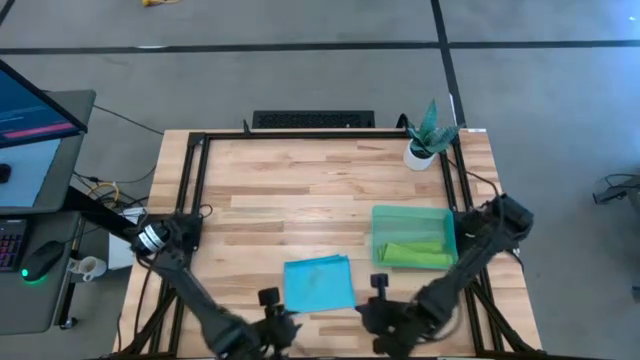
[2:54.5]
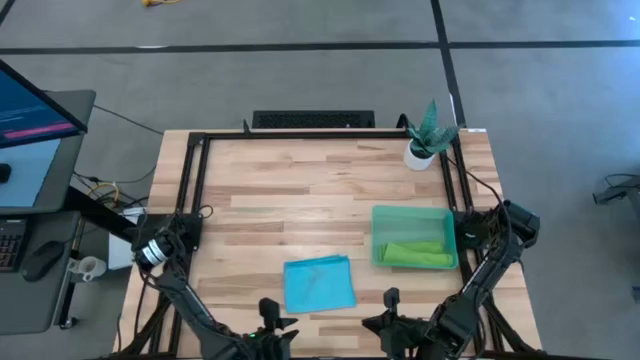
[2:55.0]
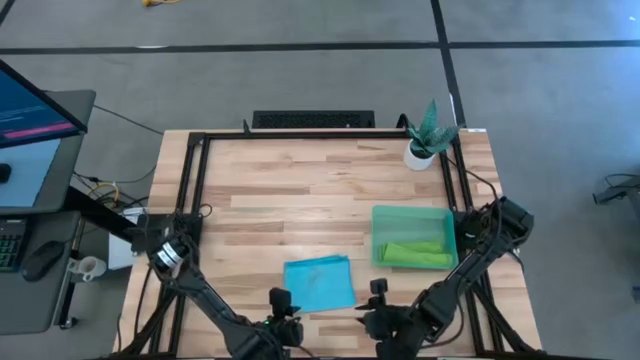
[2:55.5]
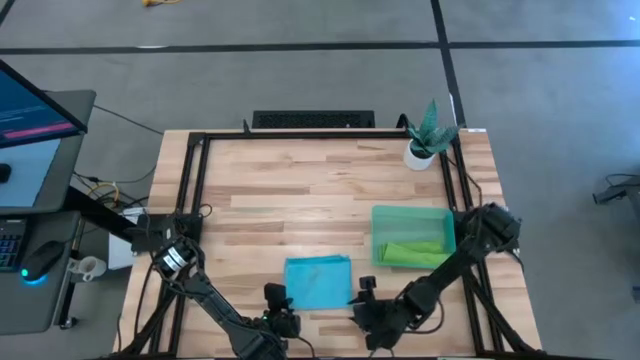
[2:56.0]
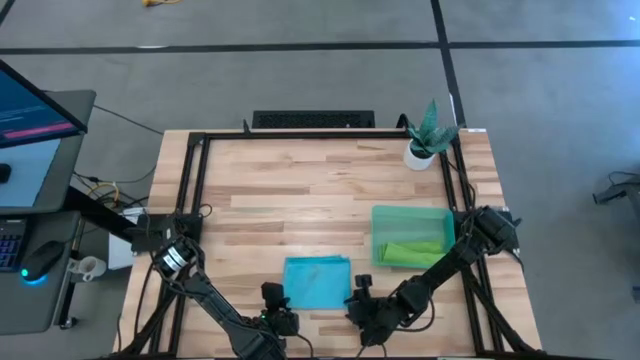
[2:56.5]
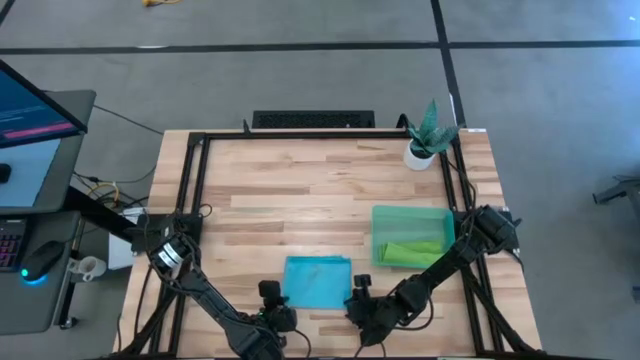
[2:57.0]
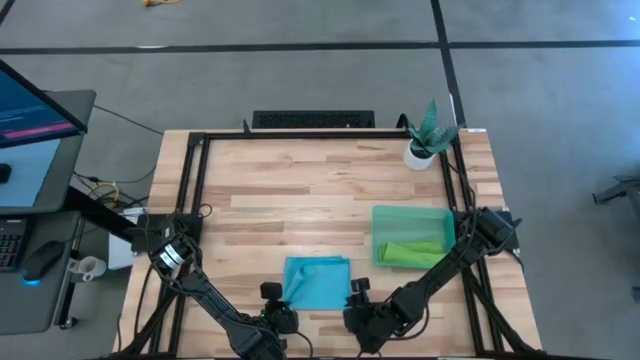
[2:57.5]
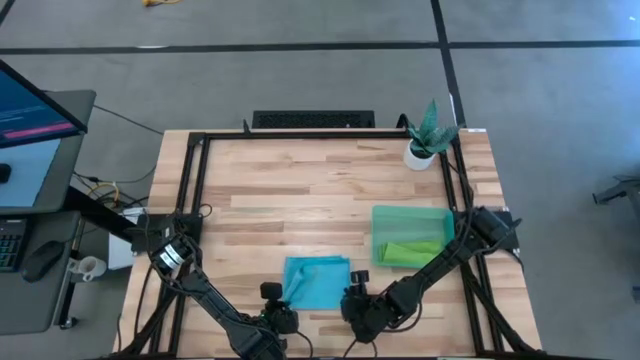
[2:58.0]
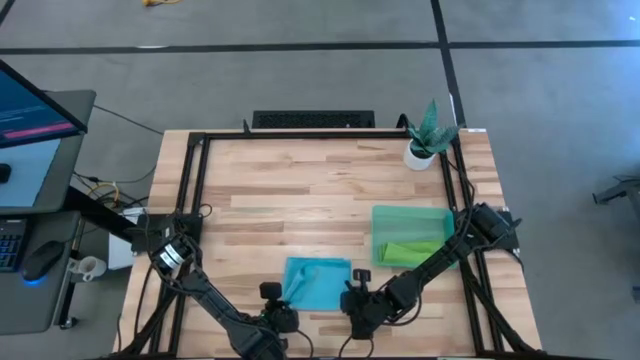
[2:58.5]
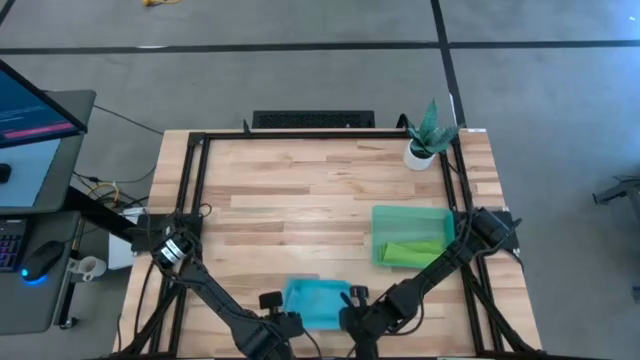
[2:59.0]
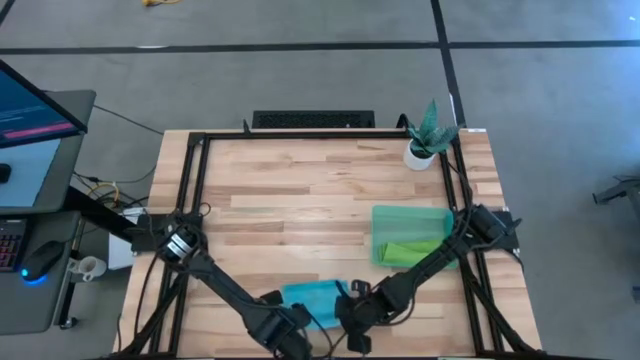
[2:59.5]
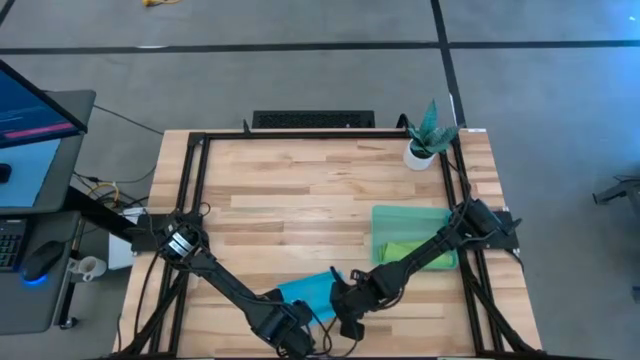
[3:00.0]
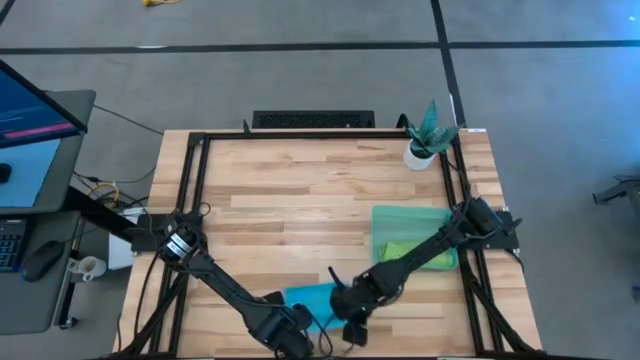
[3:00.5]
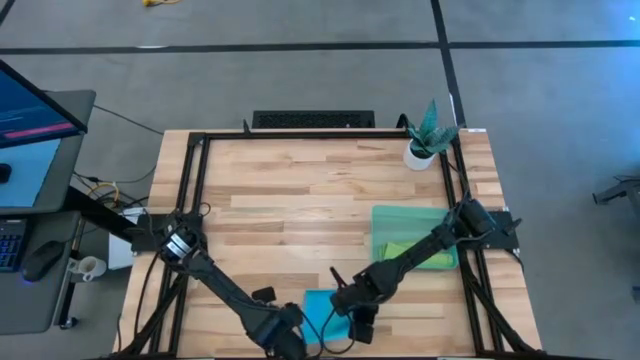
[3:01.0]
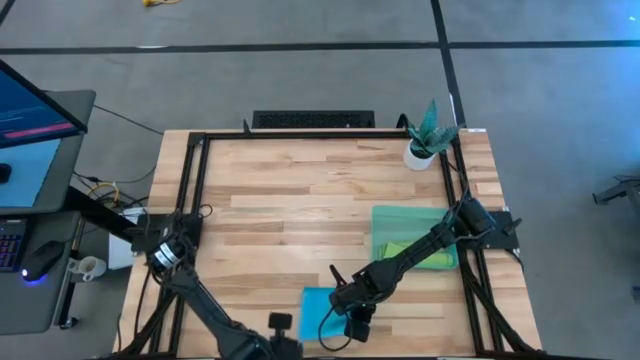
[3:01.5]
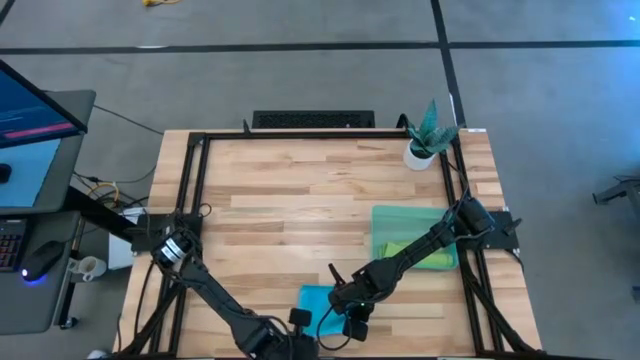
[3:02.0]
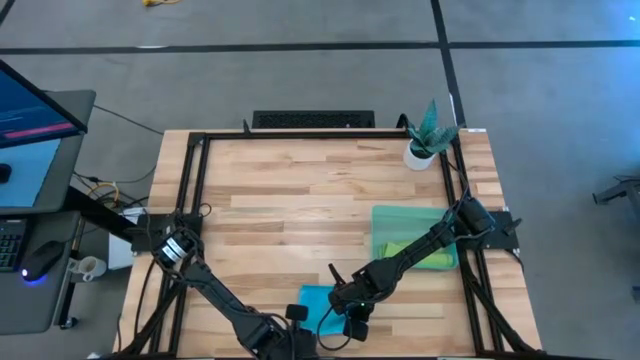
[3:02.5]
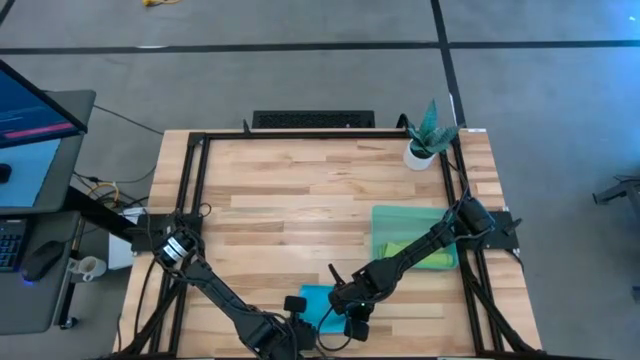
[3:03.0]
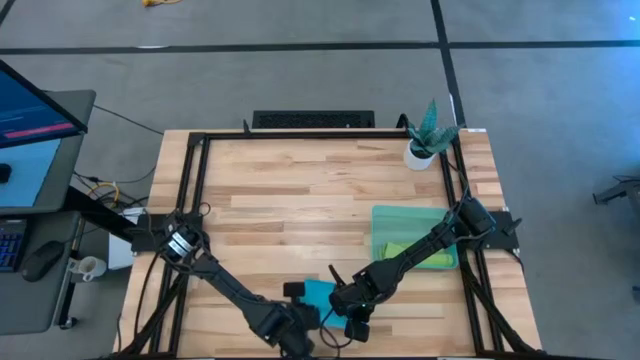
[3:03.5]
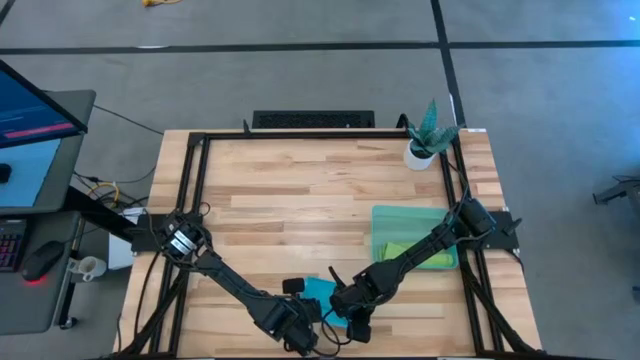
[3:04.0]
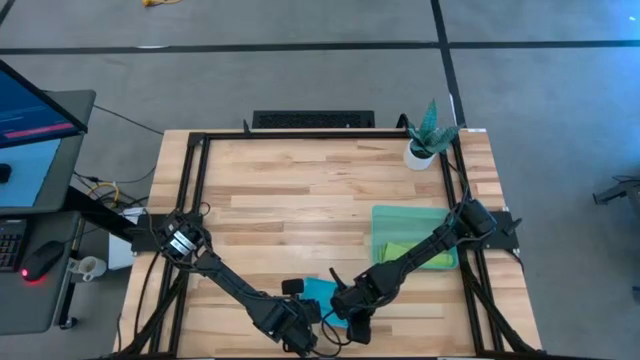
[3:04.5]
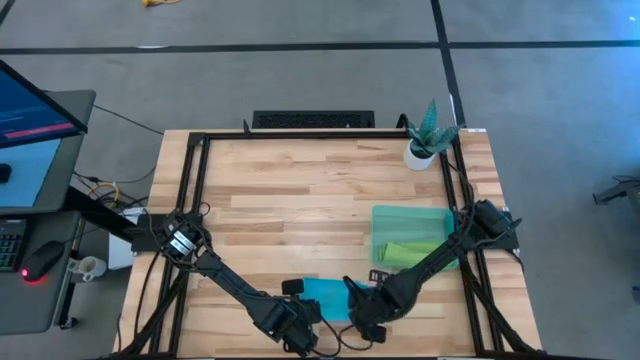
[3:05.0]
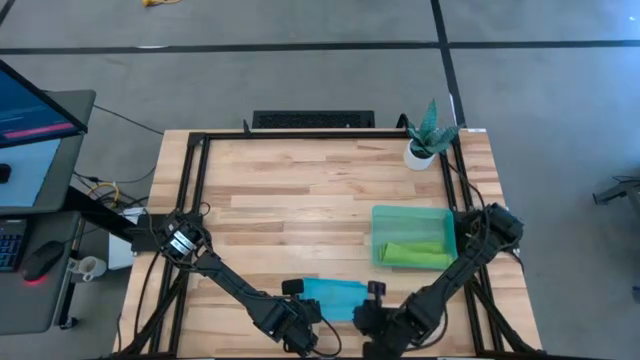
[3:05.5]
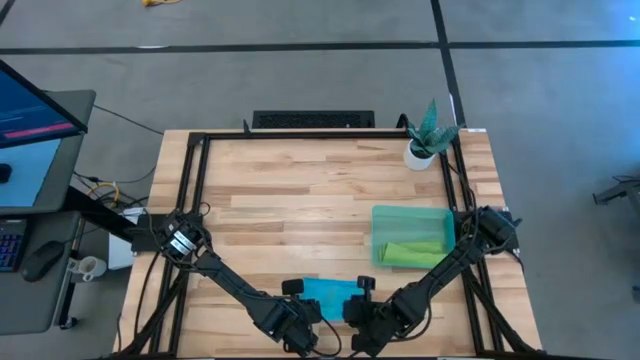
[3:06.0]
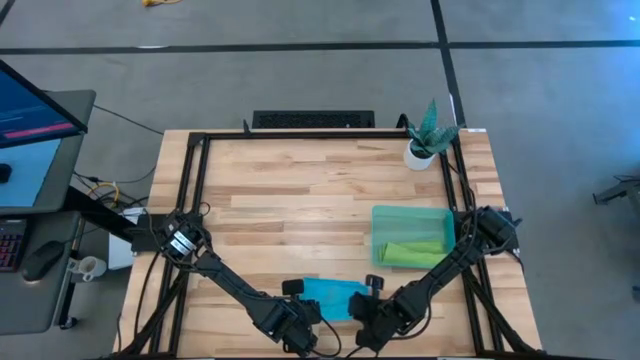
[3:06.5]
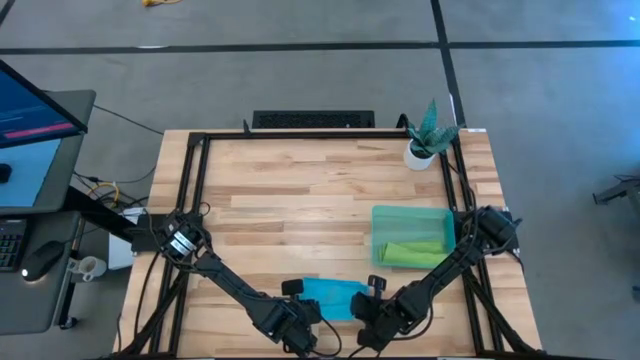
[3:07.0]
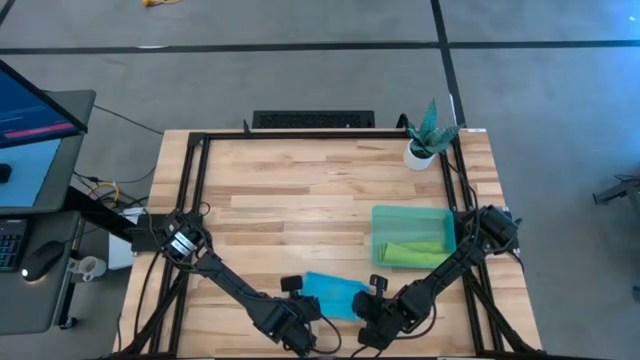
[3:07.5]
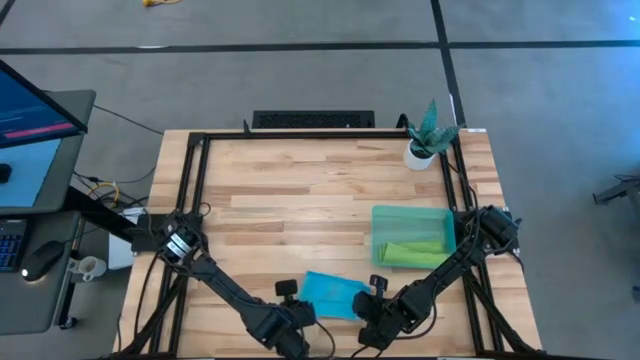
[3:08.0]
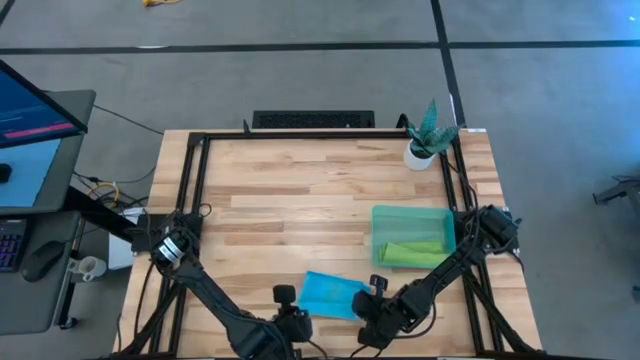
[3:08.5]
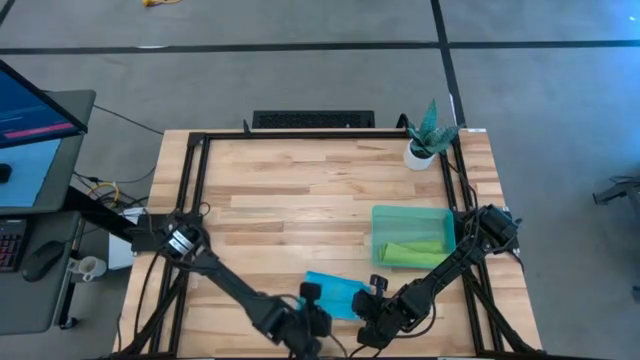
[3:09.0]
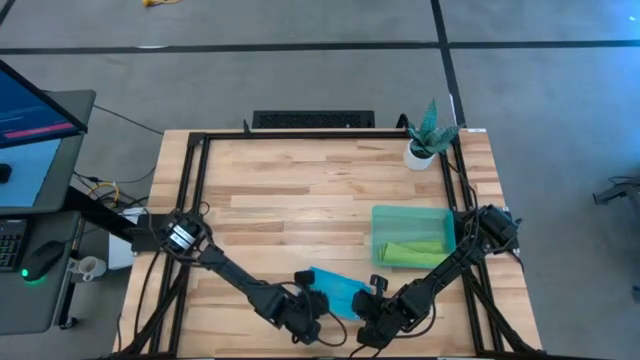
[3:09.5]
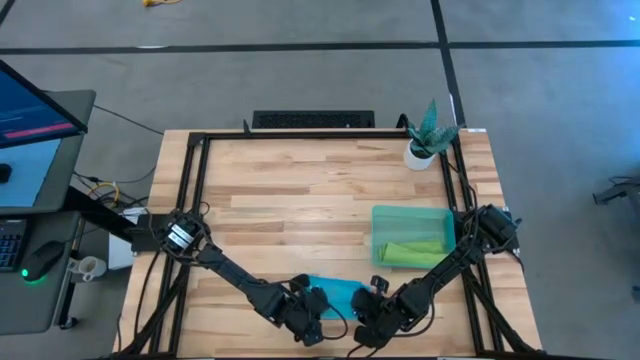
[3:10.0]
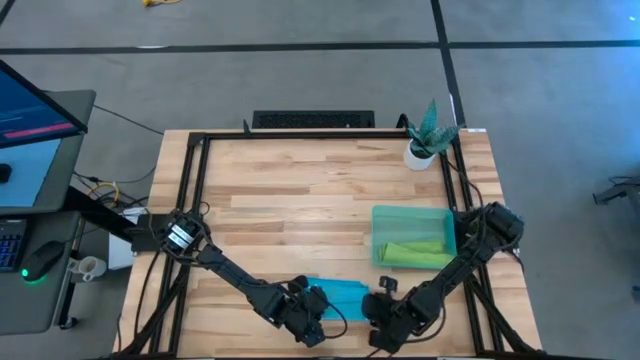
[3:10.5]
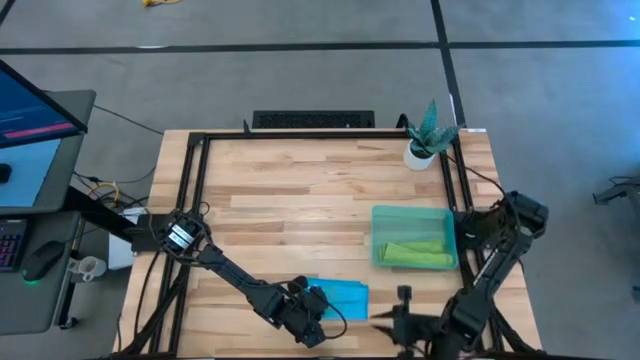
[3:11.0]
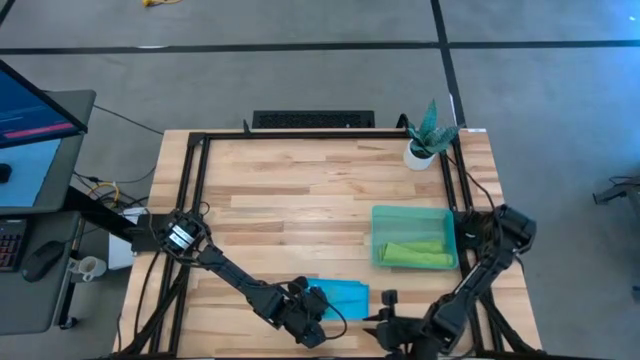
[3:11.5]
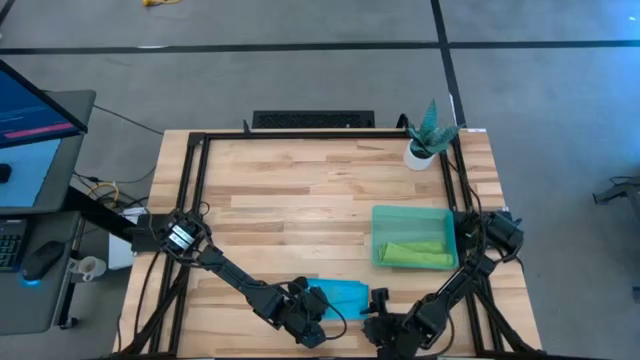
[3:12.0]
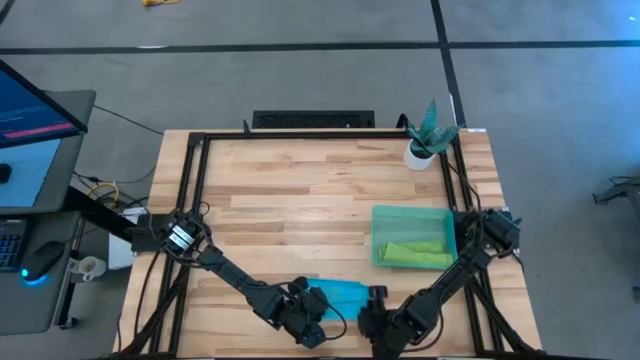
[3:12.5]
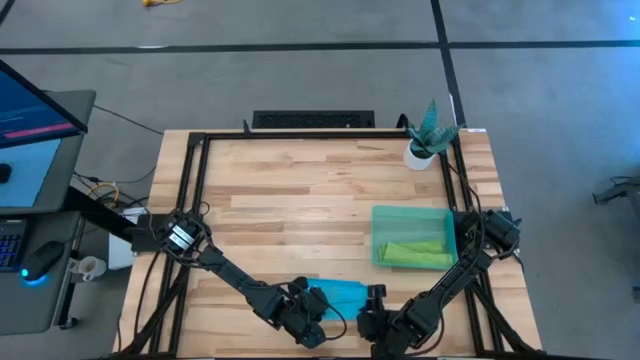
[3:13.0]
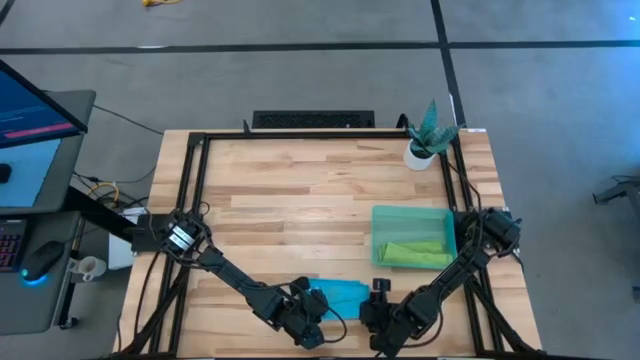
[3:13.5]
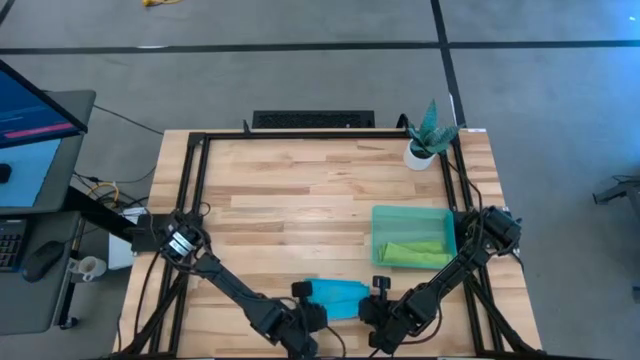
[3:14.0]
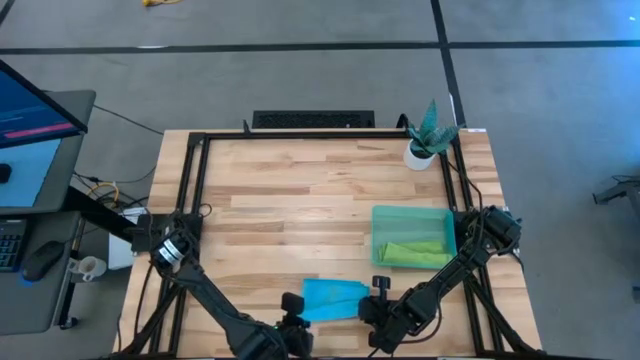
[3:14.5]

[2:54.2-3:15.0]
Task: Roll microfiber towels into tight, uniform cylinder then place into a basket
Roll the blue towel

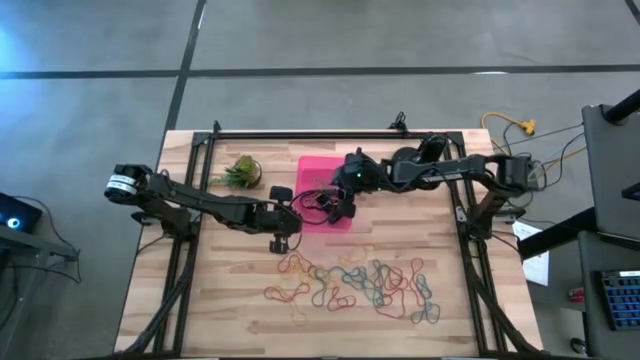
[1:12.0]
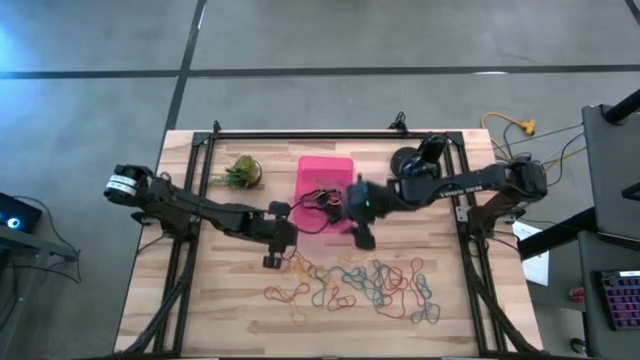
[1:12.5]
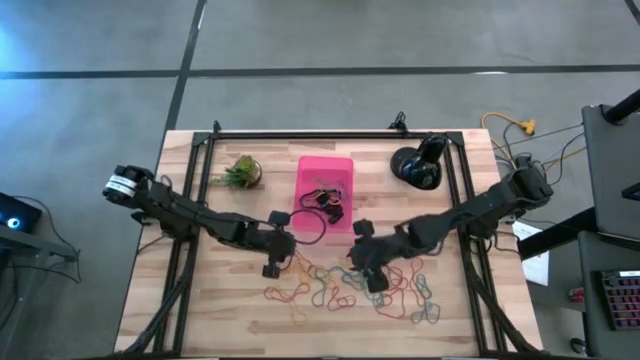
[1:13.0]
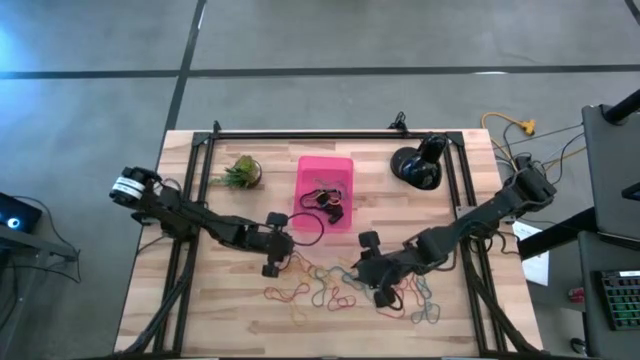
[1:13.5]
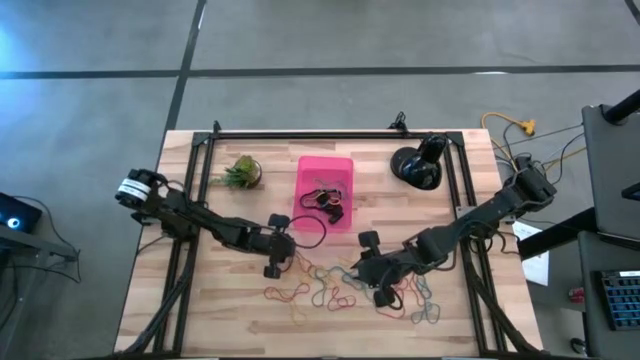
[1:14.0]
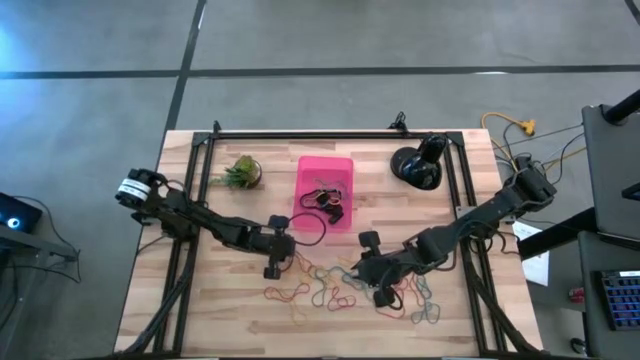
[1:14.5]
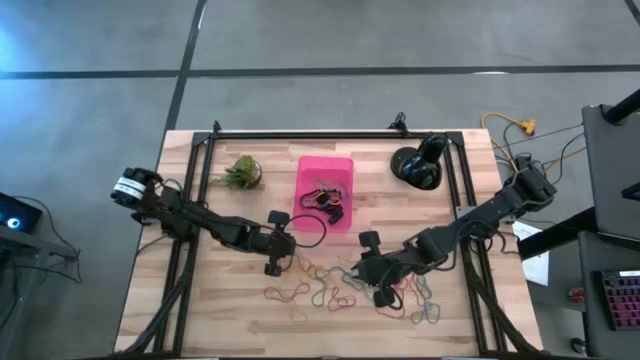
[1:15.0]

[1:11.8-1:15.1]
Task: Pick and place rubber bands into bin
Put the red rubber bands into the pink bin
